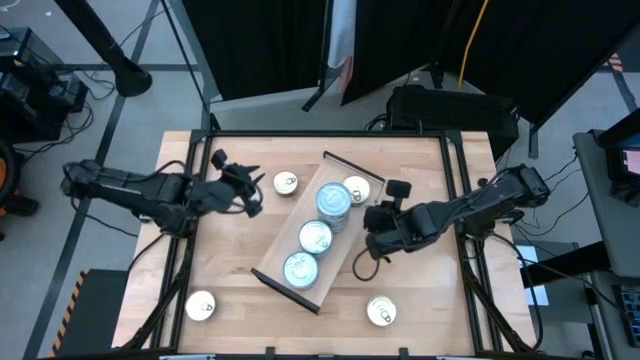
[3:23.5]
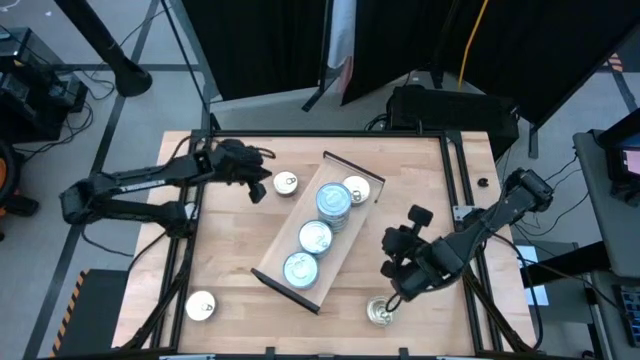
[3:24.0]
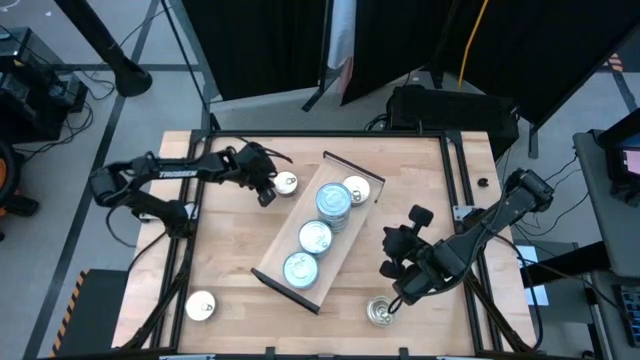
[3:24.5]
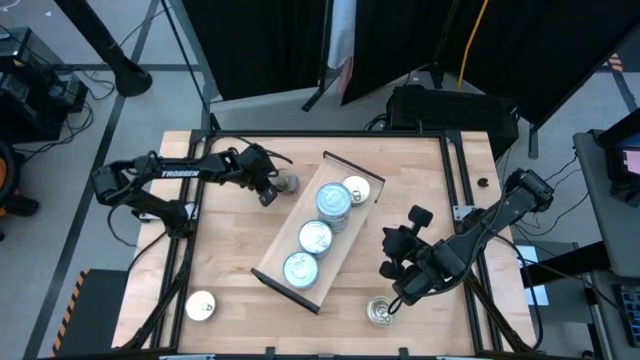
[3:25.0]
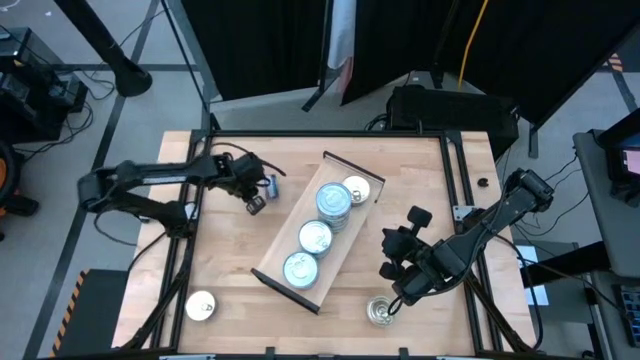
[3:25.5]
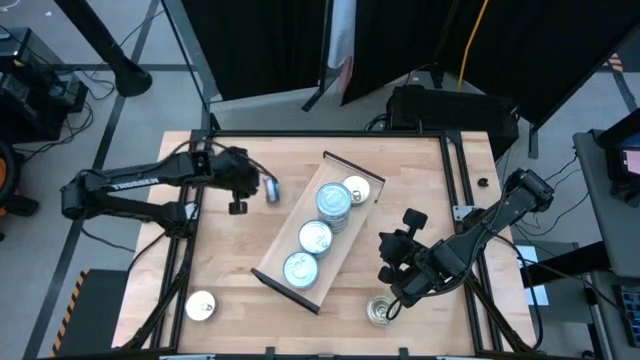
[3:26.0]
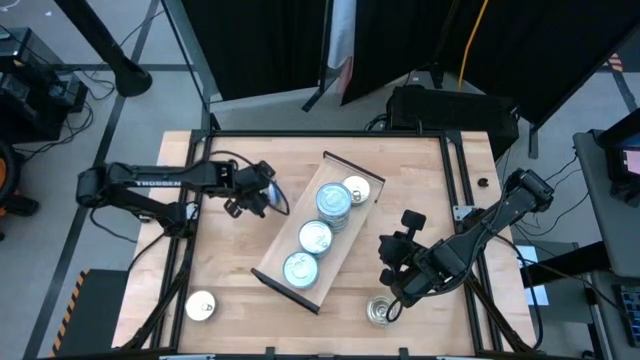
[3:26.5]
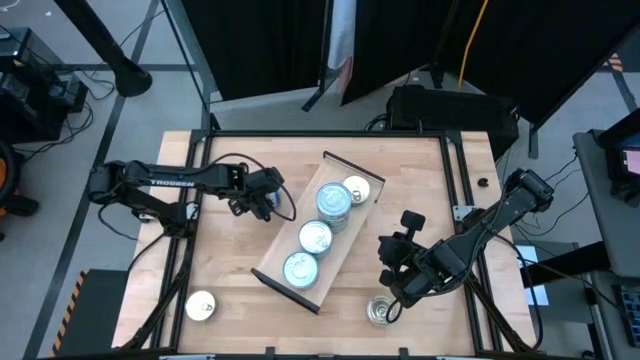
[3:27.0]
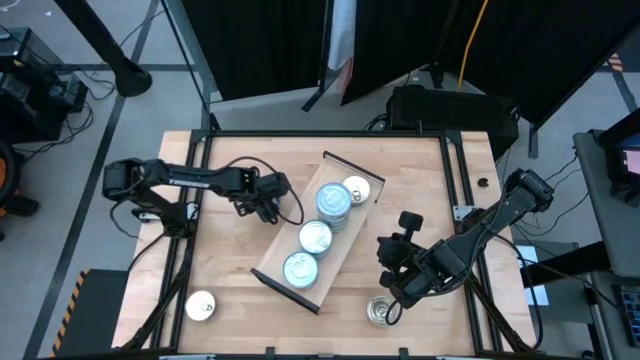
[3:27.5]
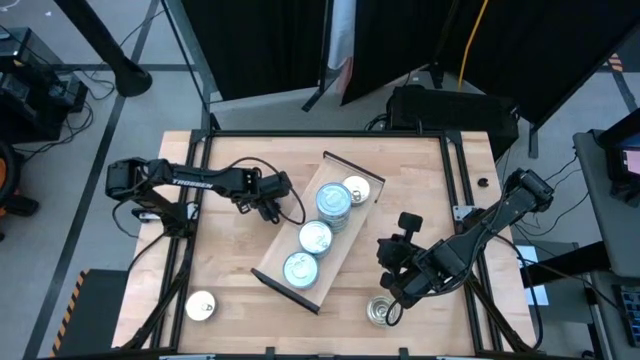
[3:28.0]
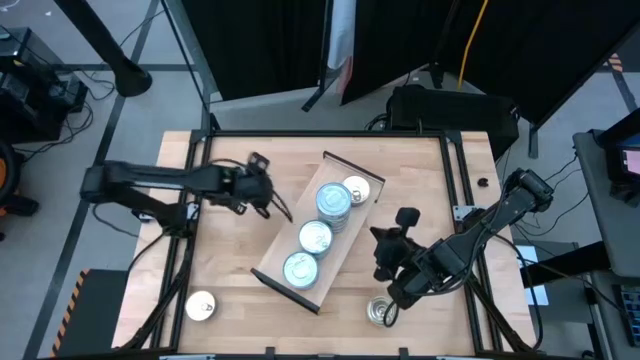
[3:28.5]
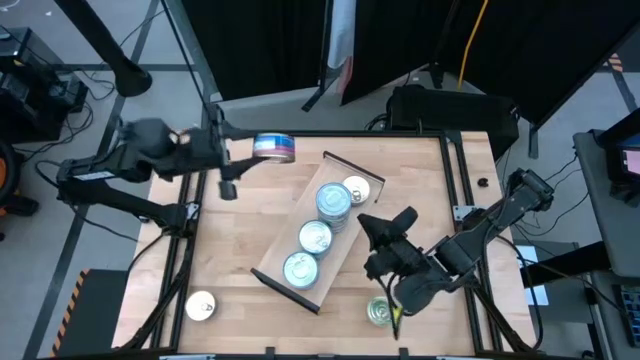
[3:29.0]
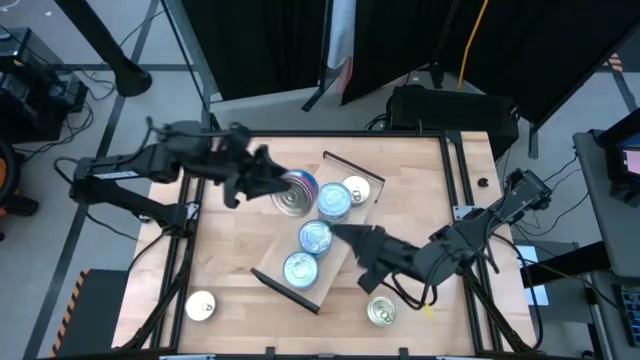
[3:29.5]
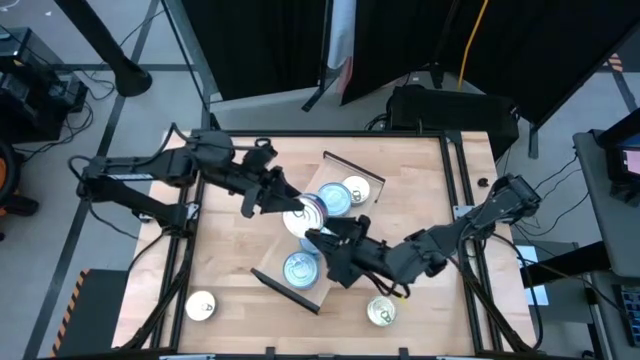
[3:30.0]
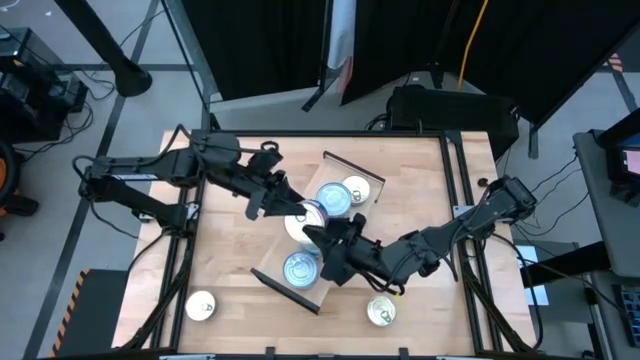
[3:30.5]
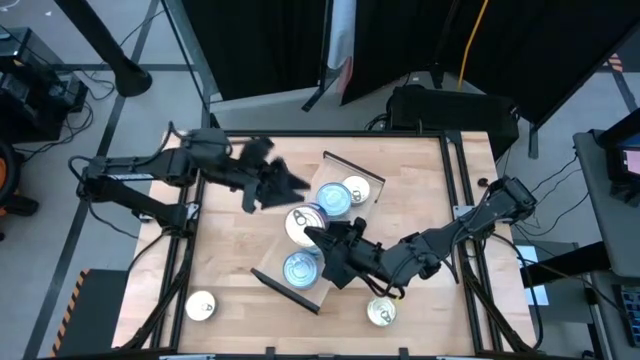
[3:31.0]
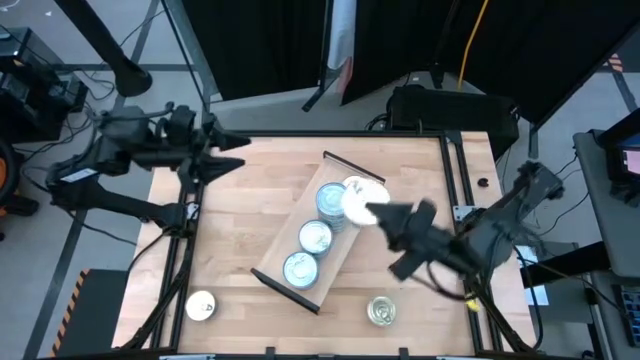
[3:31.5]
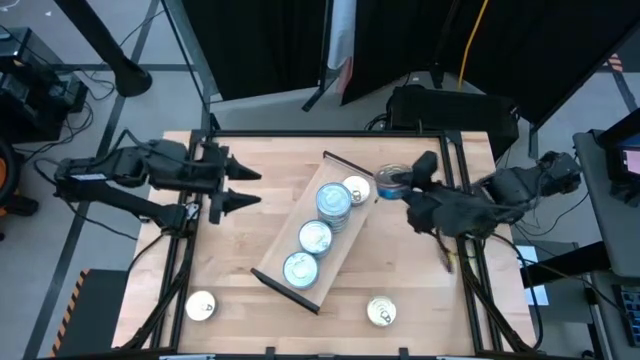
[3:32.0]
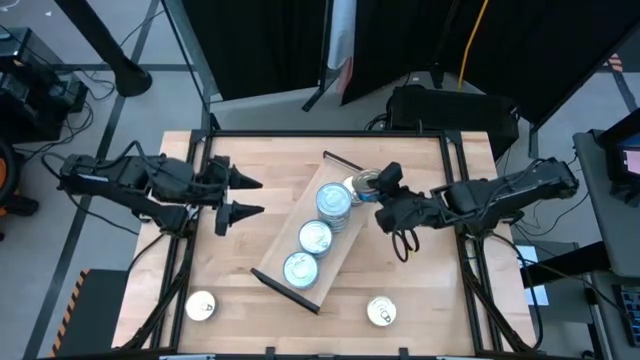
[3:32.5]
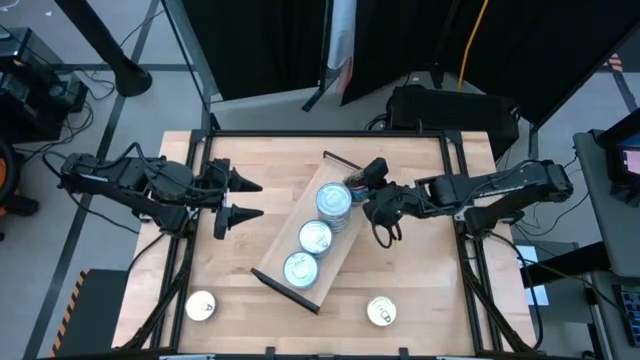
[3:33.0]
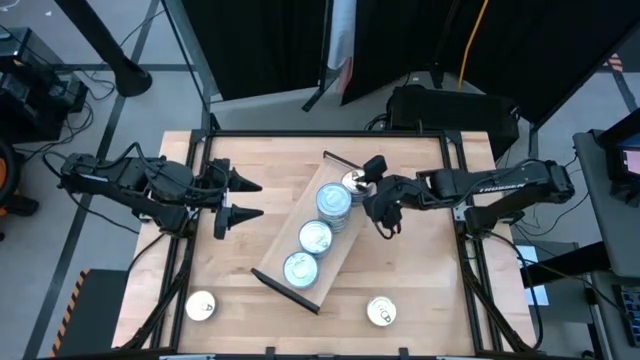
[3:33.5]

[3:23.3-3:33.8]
Task: Stack canned seafood by type on shelf
Stack the blue-pink tuna can on top of the other blue-pink tuna can on the shelf

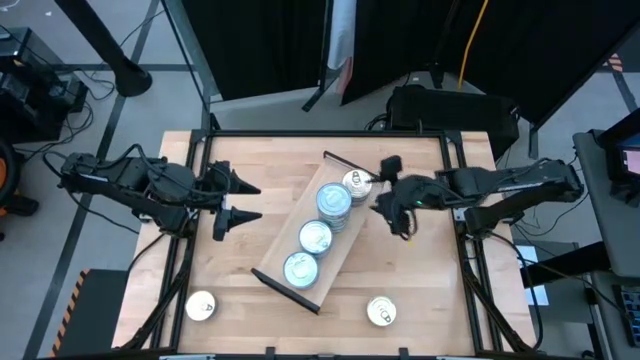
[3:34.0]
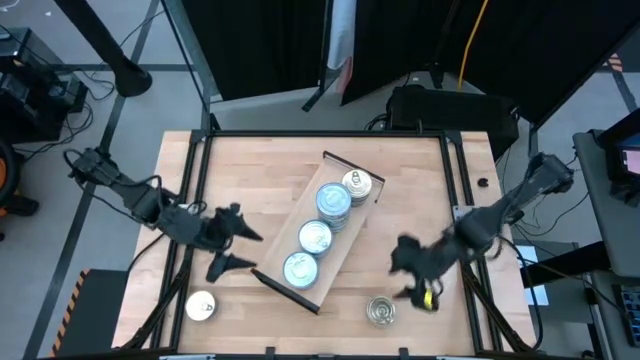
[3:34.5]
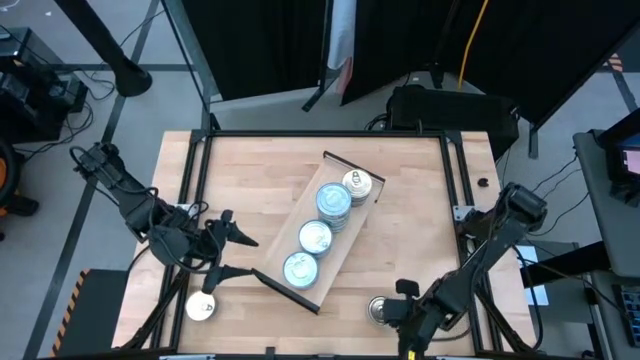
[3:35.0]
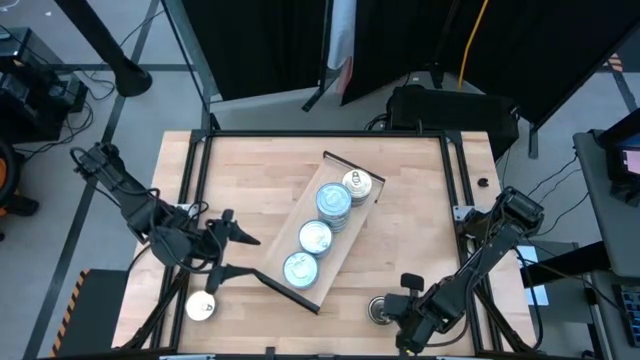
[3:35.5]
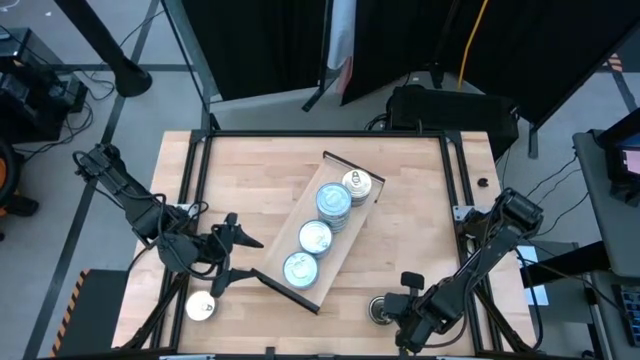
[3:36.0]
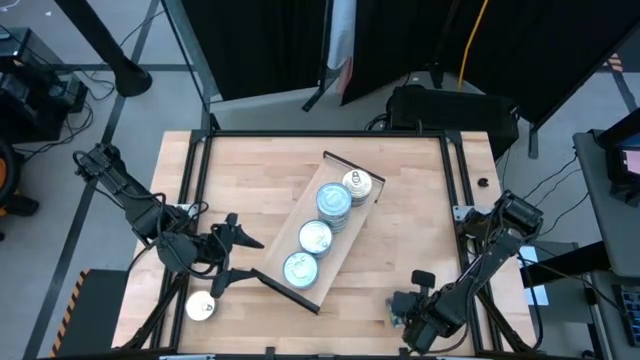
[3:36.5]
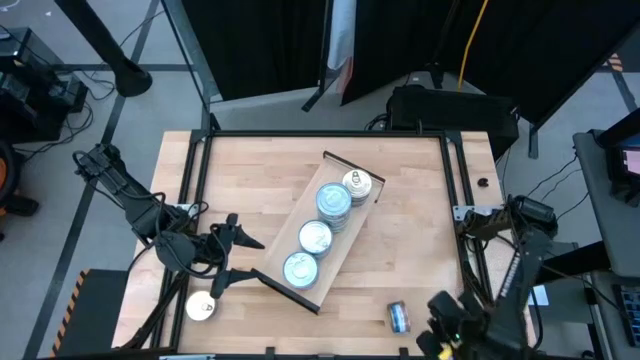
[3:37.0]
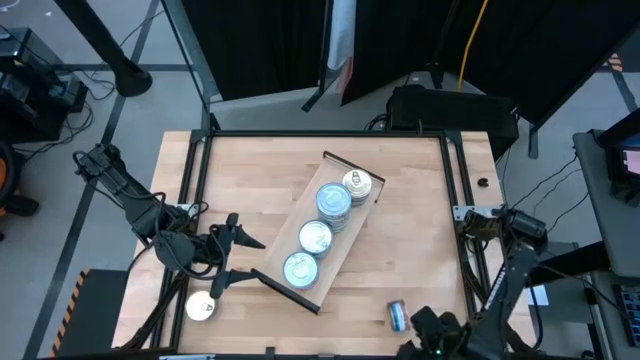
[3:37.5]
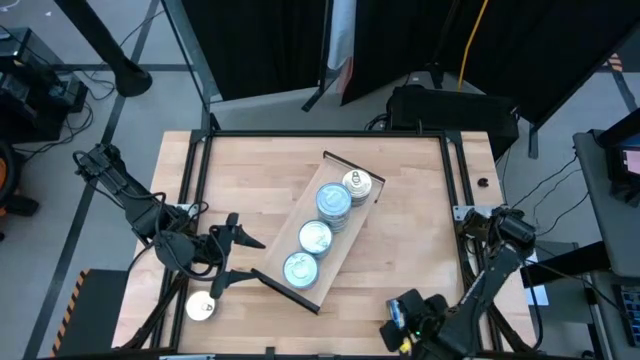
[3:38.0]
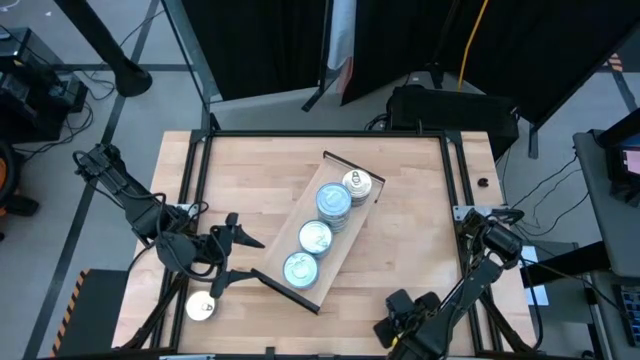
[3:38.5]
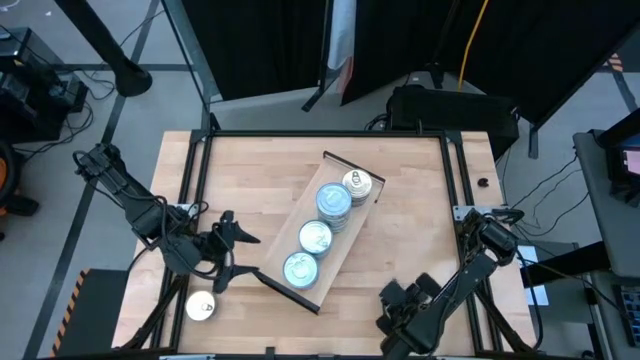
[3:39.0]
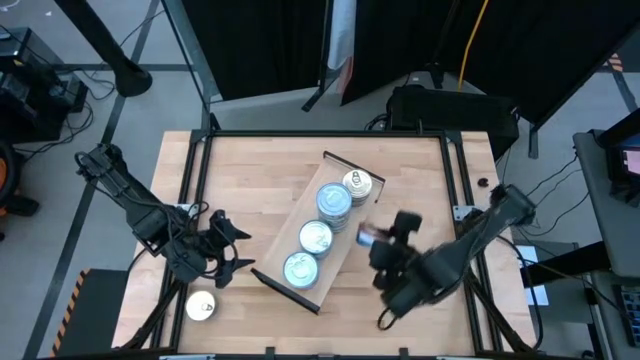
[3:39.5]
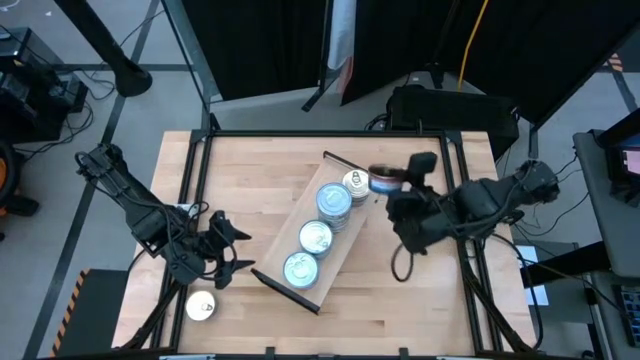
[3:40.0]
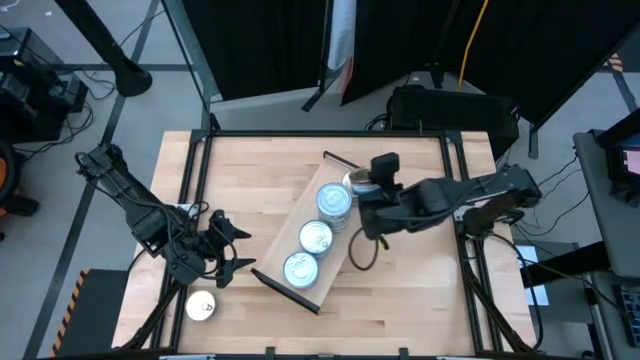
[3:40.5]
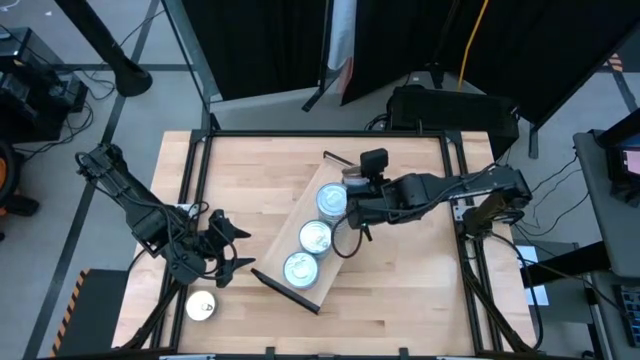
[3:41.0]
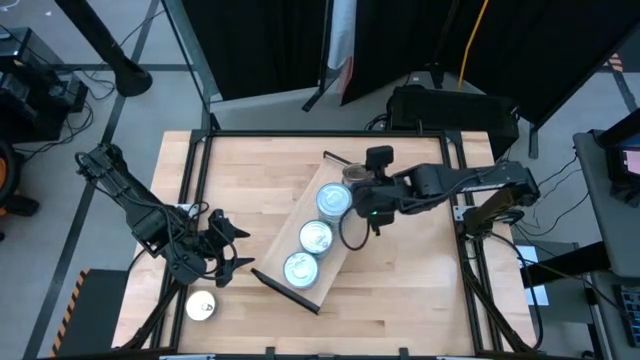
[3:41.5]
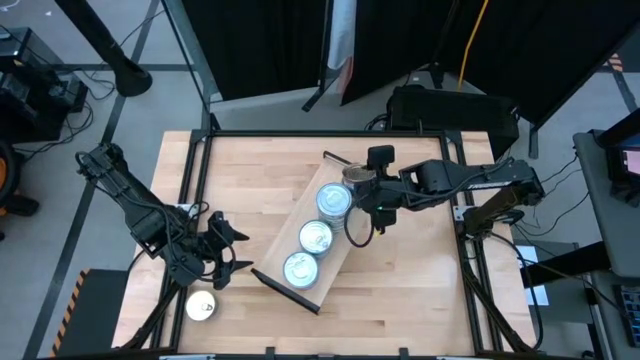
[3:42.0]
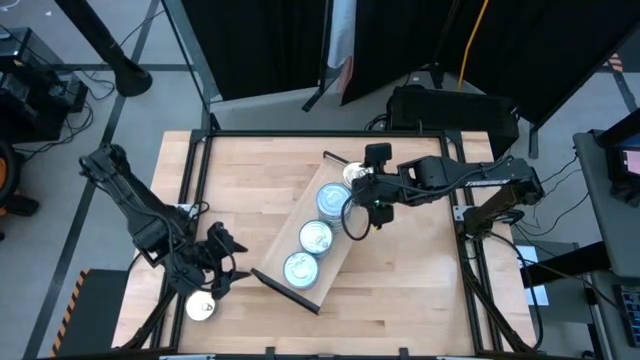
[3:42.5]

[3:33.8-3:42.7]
Stack the blue-pink tuna can on top of the other blue-pink tuna can on the shelf

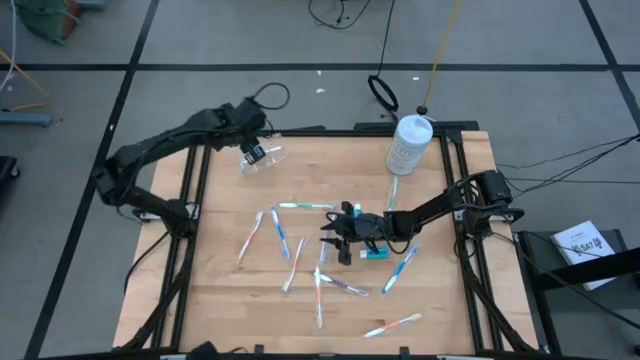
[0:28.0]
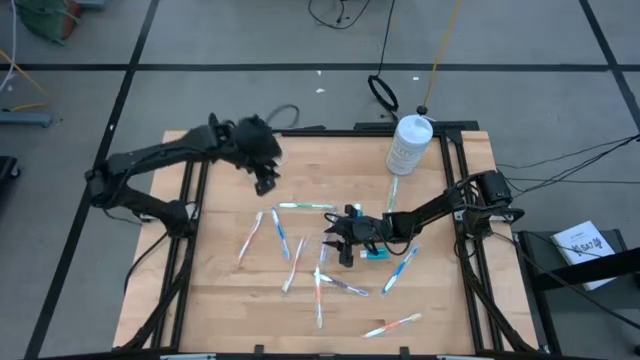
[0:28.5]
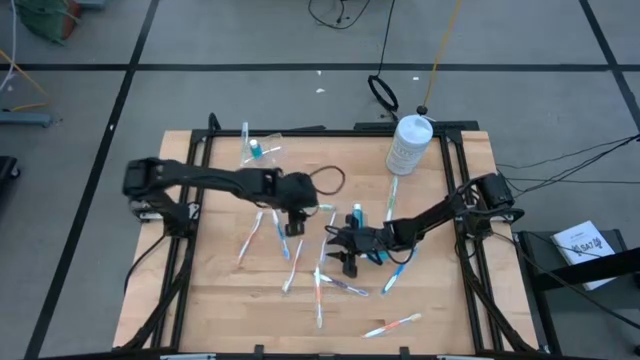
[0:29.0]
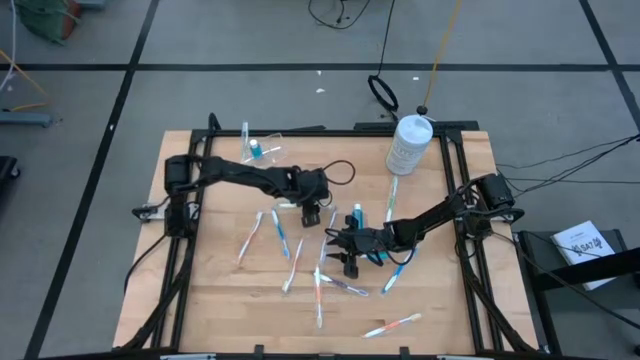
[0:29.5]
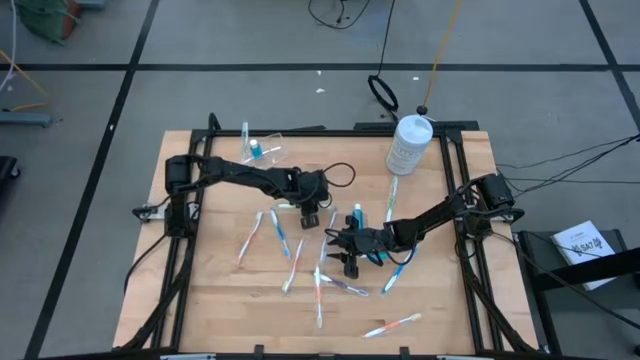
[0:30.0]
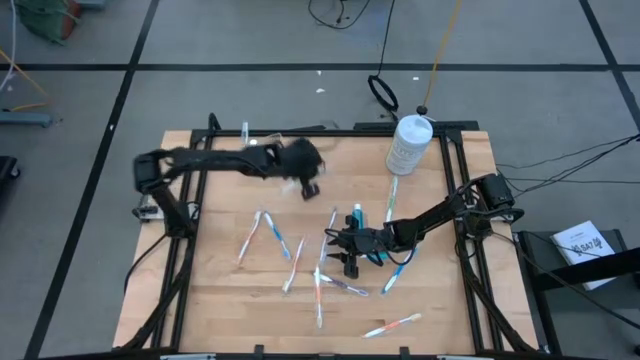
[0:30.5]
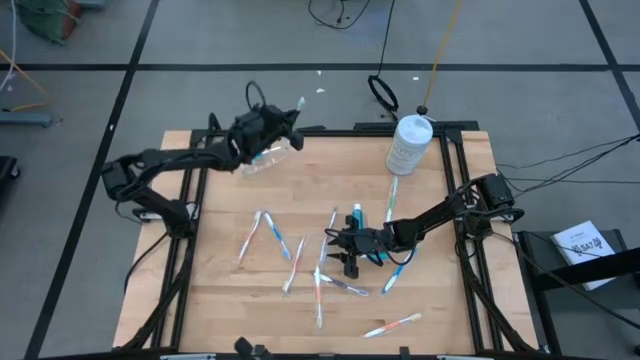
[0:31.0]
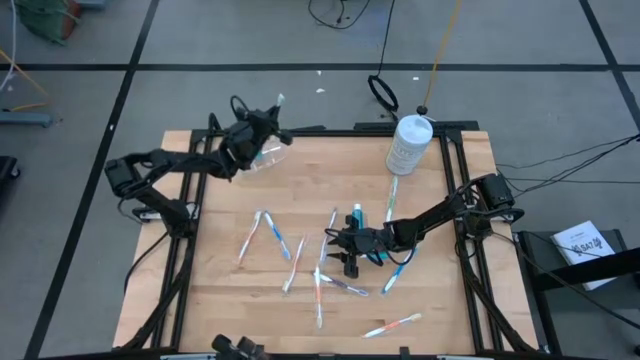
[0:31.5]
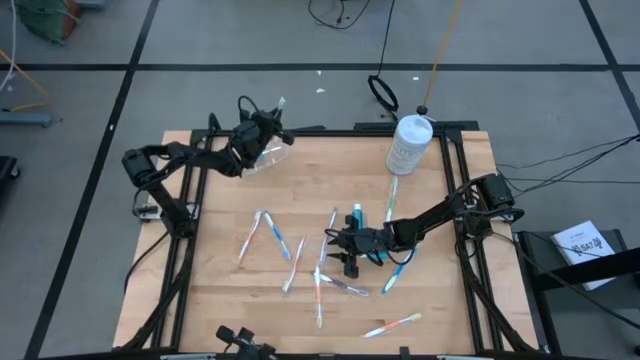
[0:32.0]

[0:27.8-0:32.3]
Task: Pick & Place toothbrushing station
Put the green toothbrush into the transparent organizer
